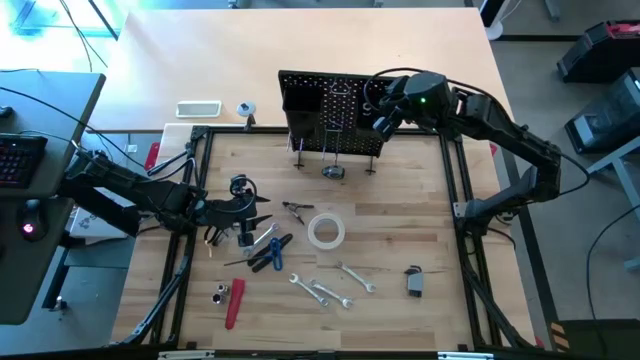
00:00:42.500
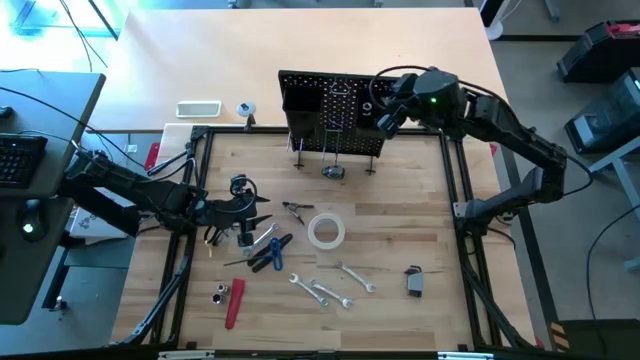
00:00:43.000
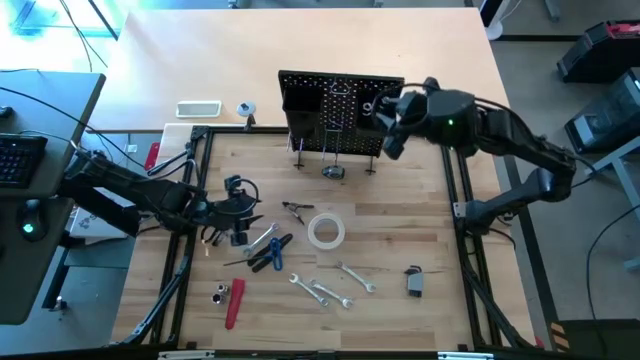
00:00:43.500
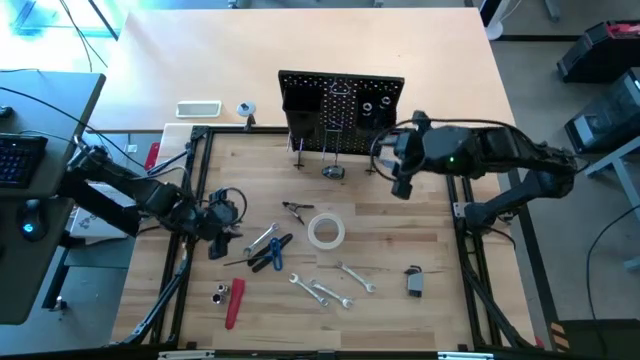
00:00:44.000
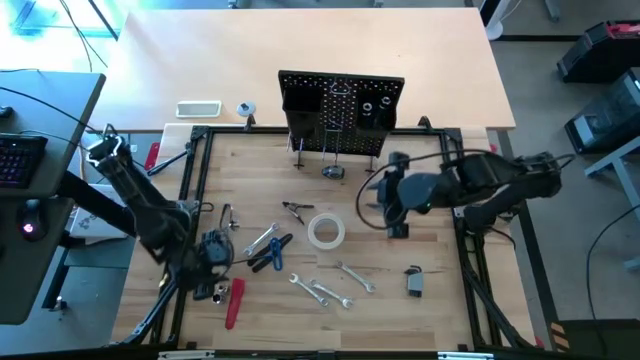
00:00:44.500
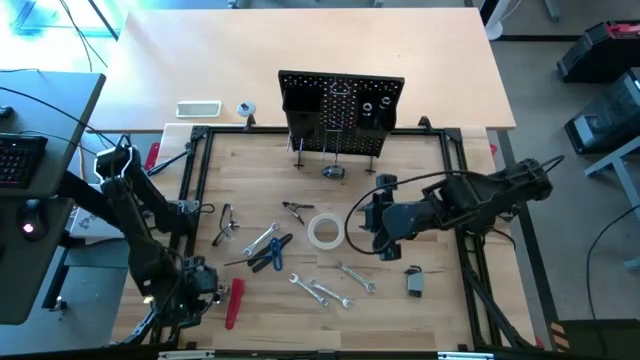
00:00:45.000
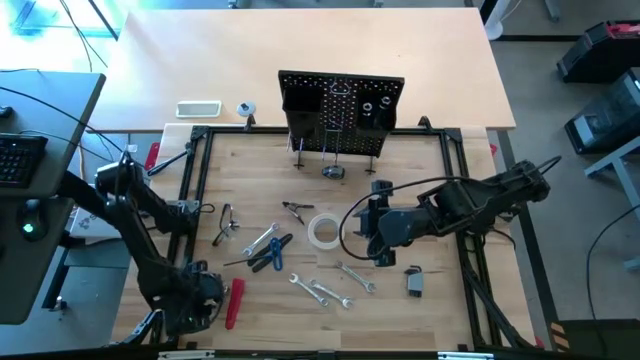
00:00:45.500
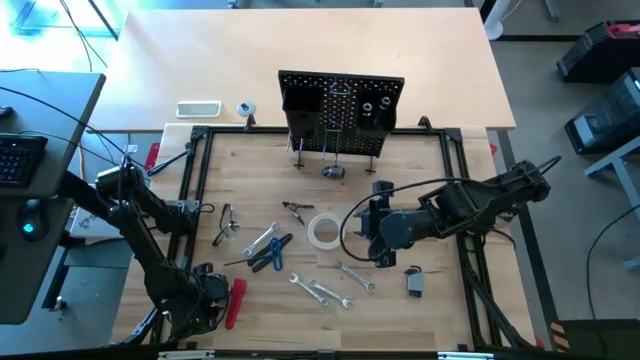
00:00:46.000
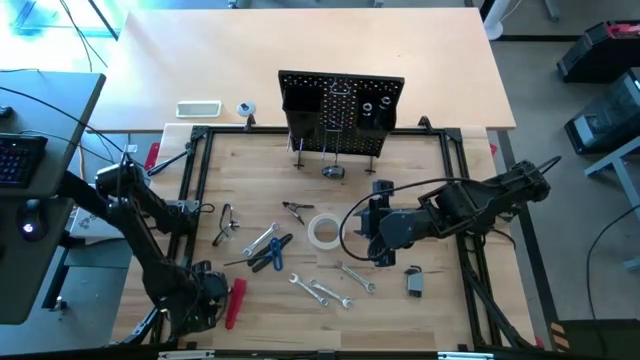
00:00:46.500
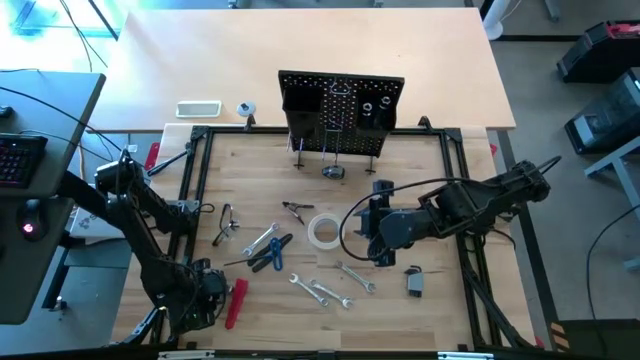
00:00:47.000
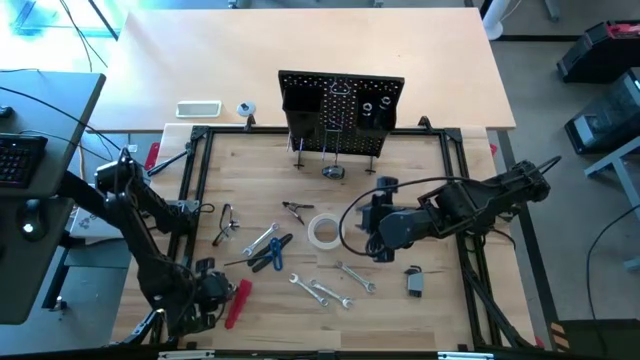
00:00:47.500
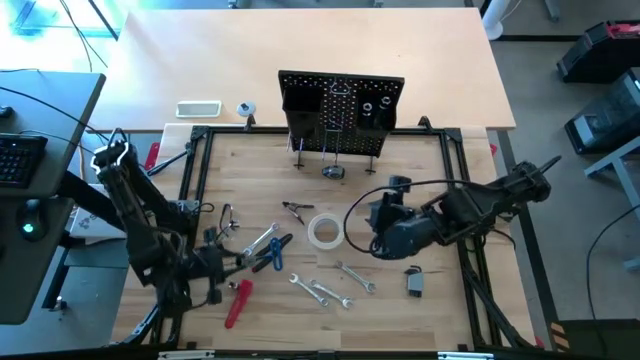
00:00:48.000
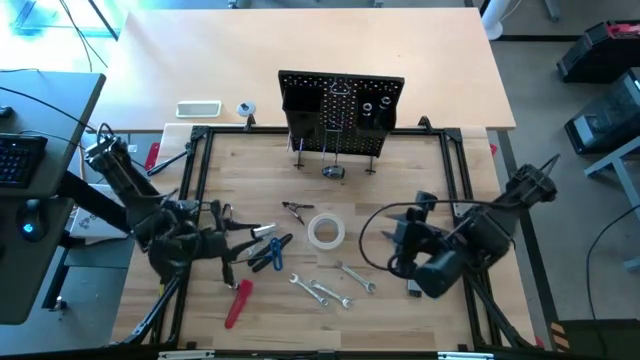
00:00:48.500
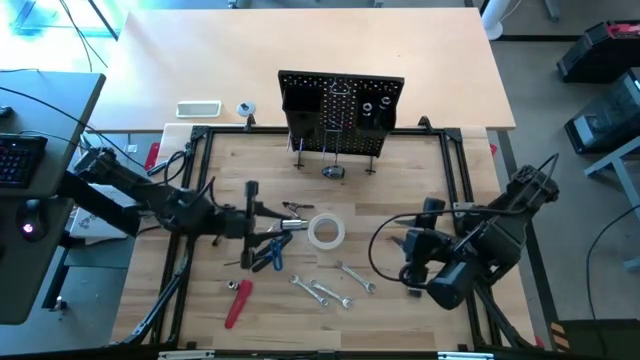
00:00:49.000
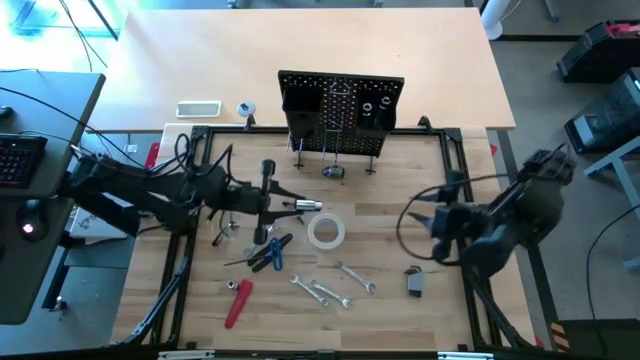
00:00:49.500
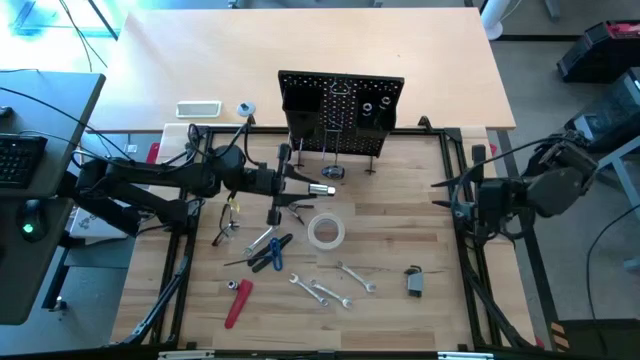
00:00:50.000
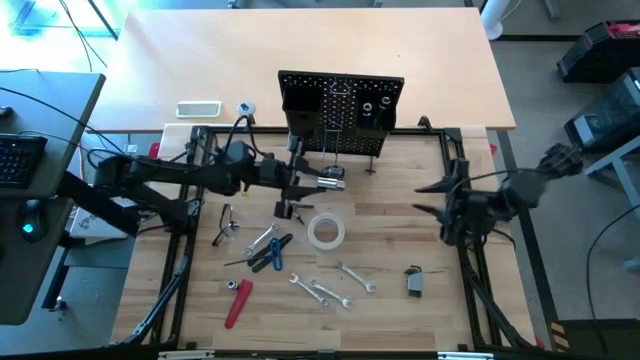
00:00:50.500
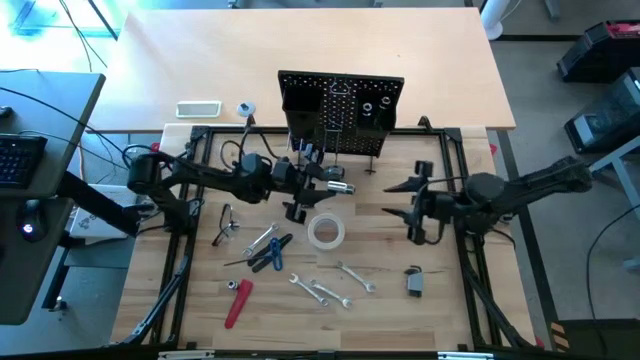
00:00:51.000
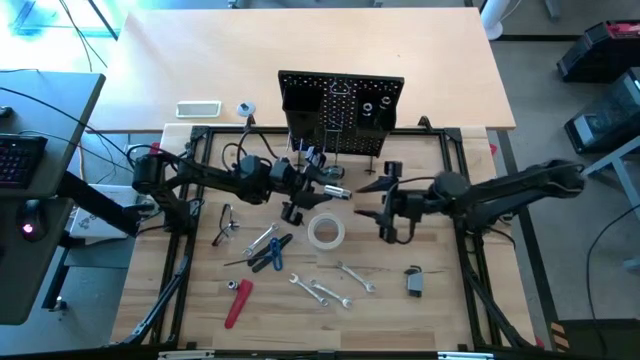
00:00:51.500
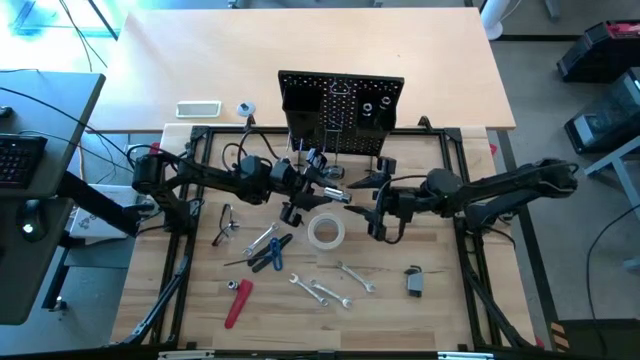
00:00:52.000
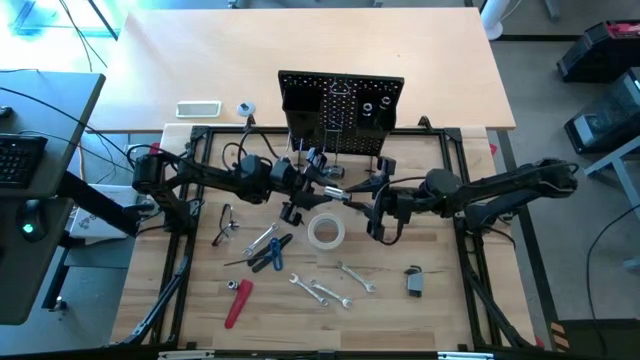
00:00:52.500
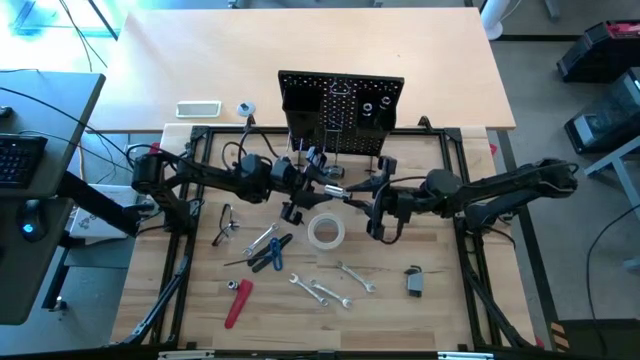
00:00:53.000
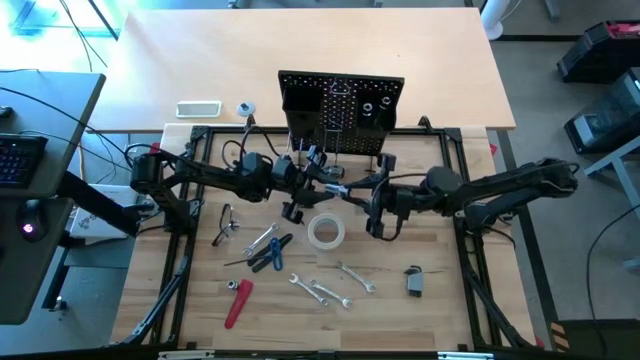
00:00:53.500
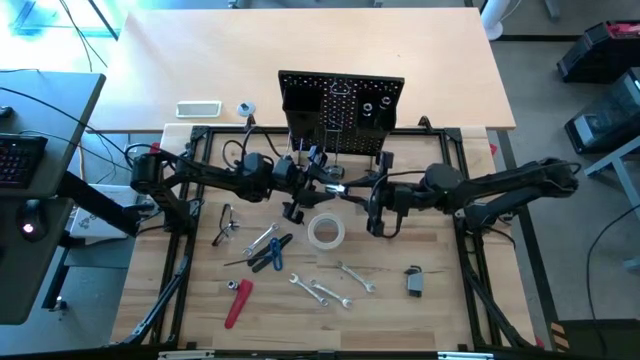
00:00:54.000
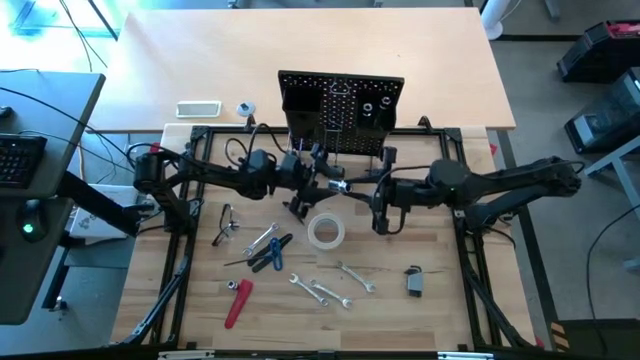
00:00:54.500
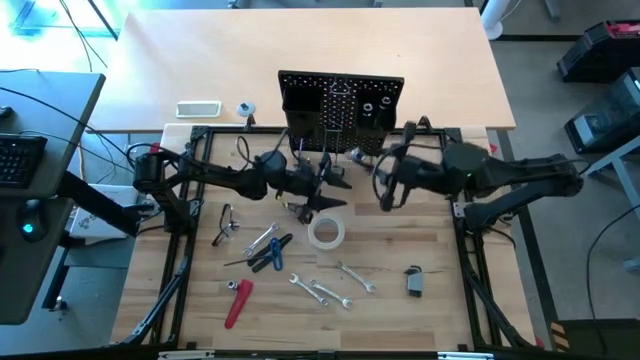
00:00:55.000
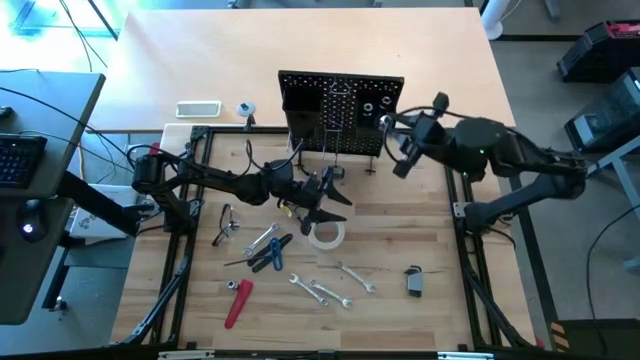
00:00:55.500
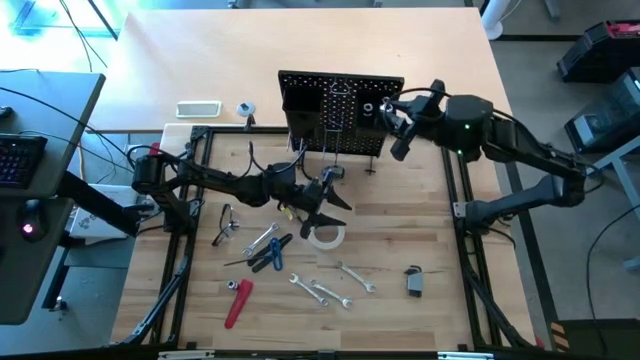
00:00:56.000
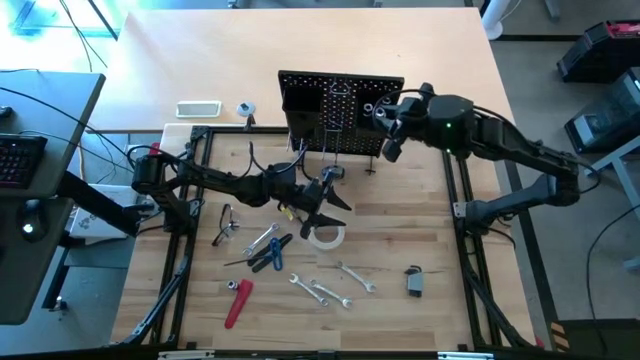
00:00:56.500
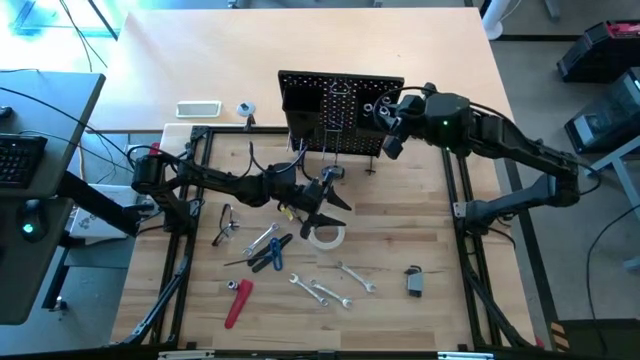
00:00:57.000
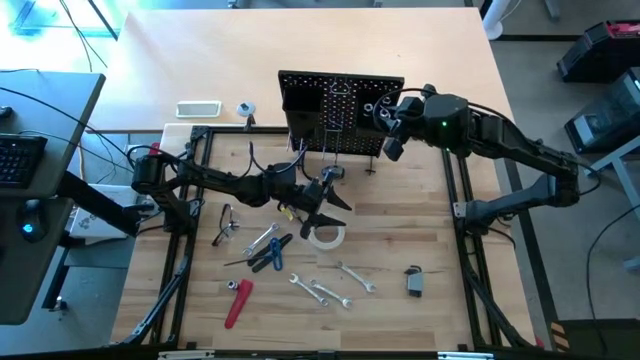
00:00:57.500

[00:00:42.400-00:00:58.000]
Task: Hang tools onto peg board
Put the silver socket into the right black bin on the peg board

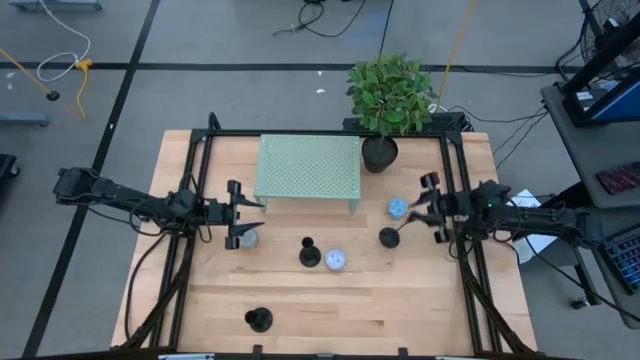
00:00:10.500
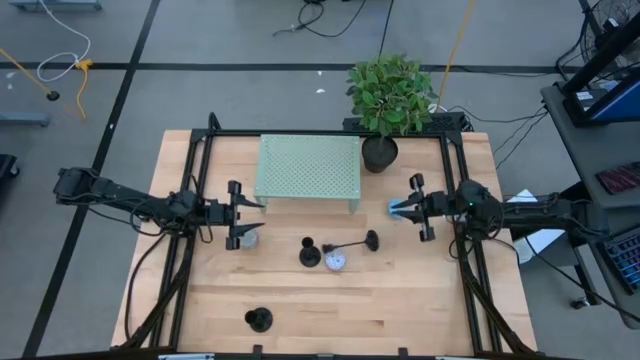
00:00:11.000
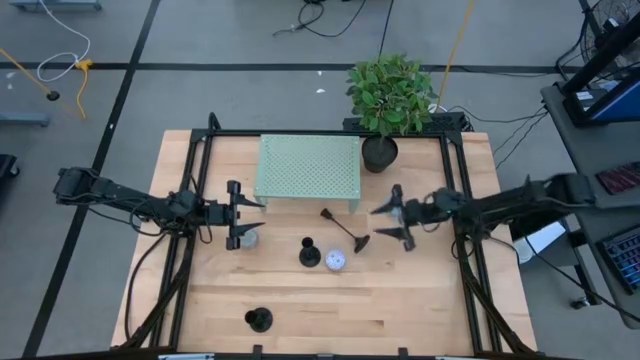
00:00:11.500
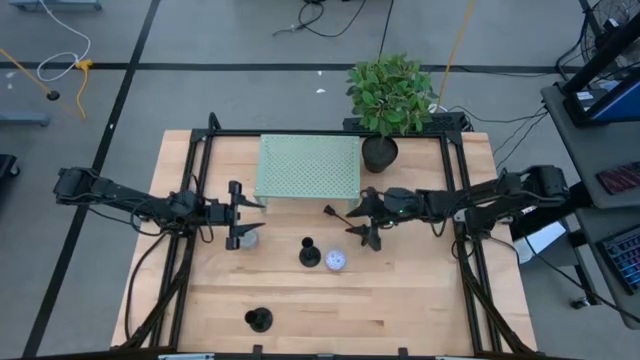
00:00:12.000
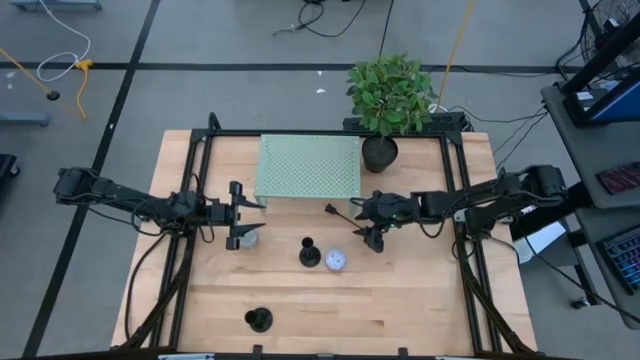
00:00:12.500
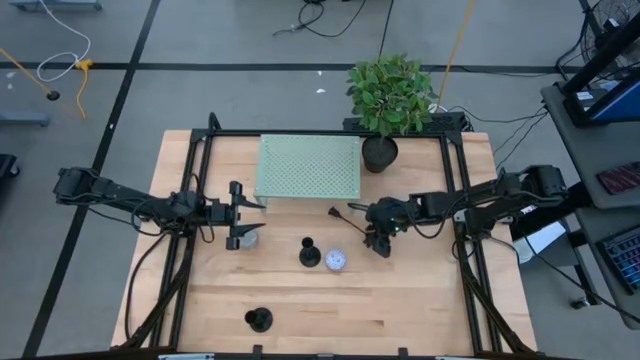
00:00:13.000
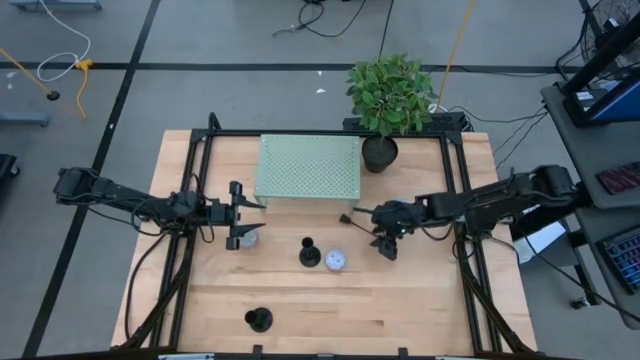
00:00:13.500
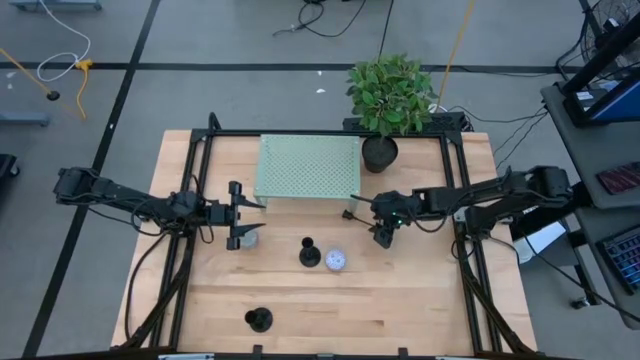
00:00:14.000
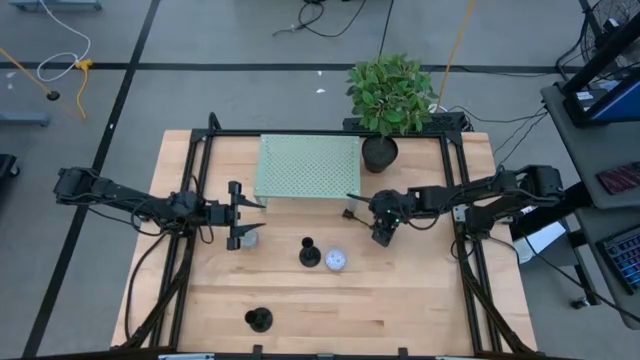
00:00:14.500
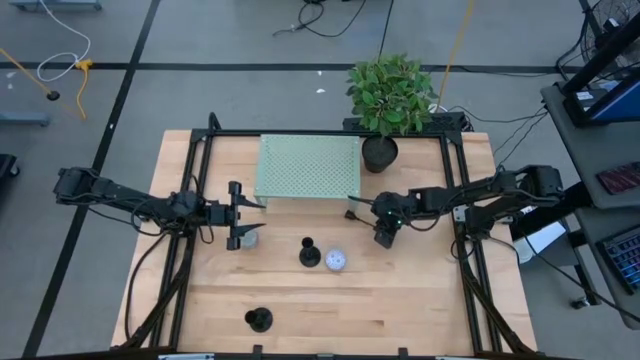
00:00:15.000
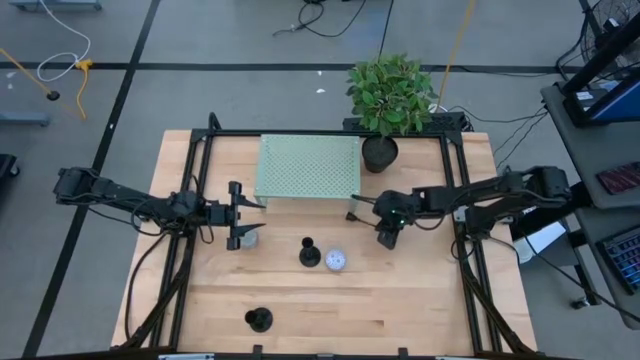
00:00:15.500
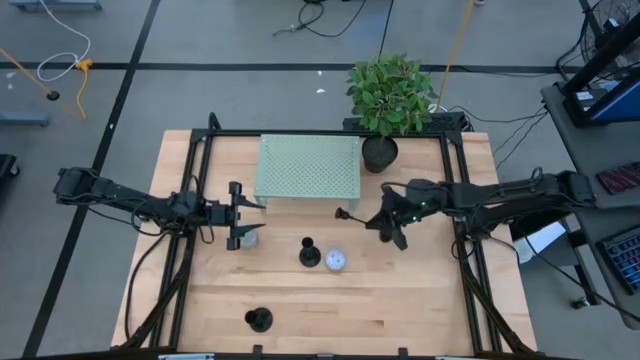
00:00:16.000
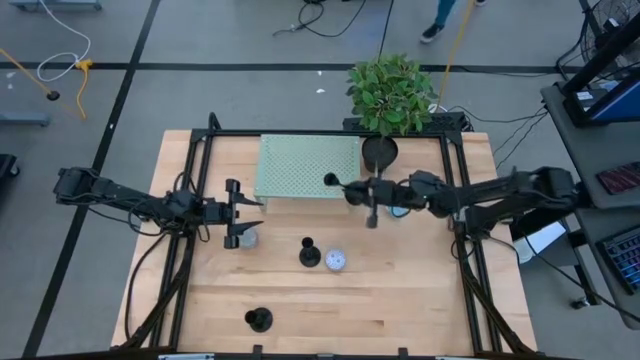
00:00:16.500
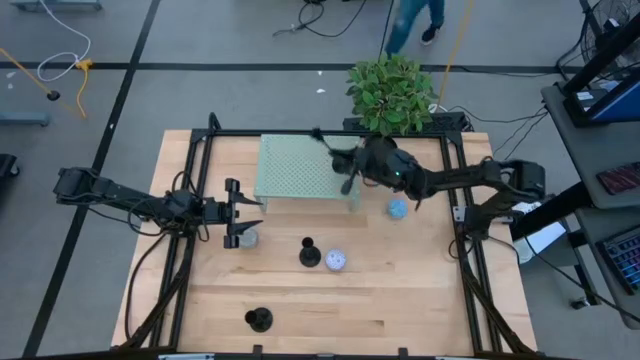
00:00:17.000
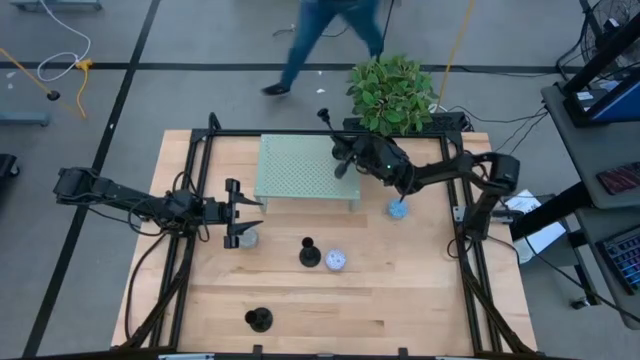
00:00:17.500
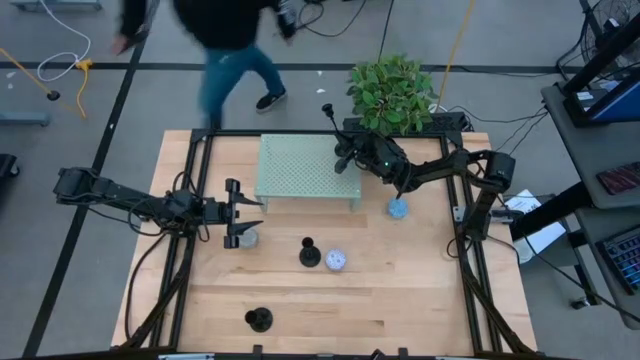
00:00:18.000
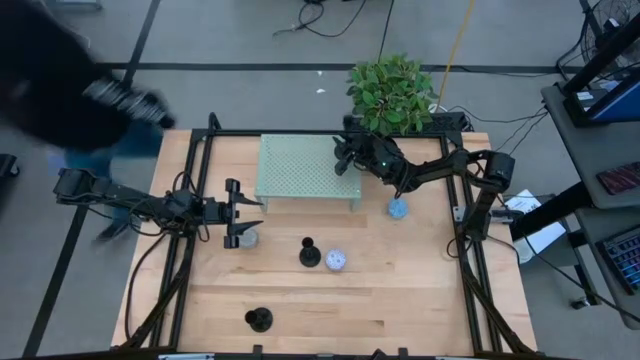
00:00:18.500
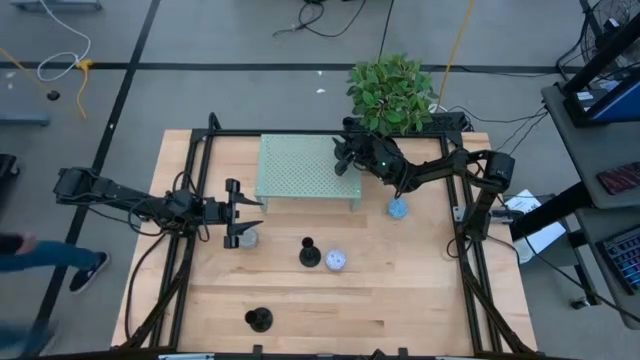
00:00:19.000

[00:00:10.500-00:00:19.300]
Task: Pick & Place candle stick holders
Put the black candle holder on the shelf
